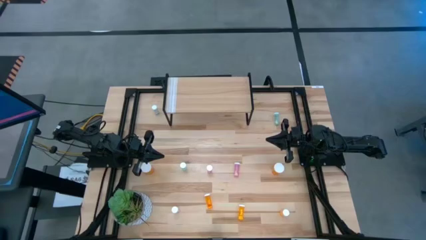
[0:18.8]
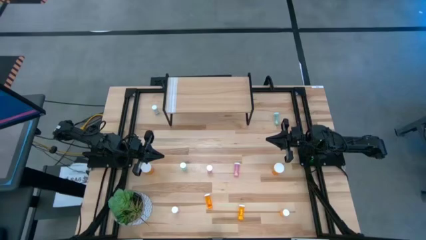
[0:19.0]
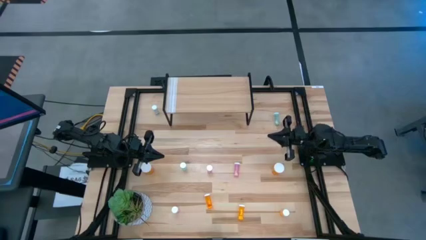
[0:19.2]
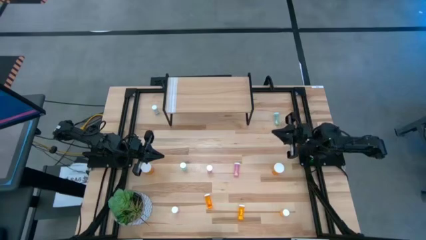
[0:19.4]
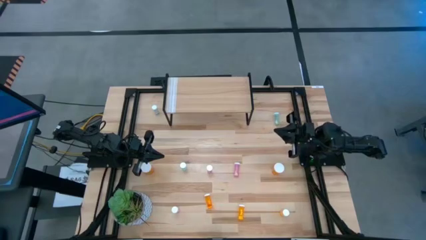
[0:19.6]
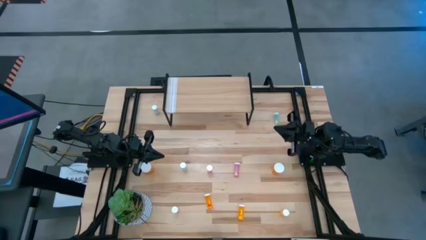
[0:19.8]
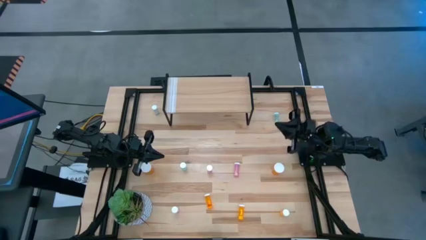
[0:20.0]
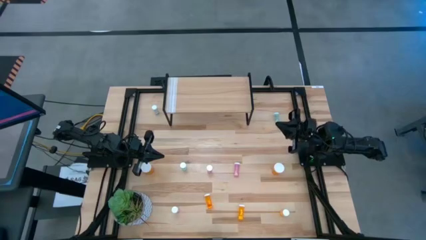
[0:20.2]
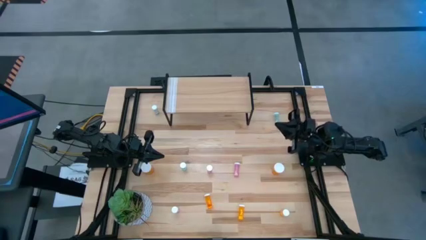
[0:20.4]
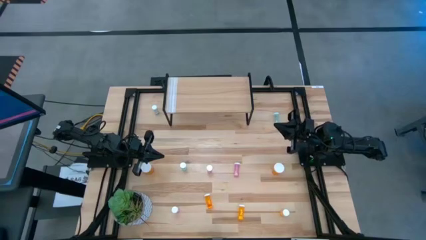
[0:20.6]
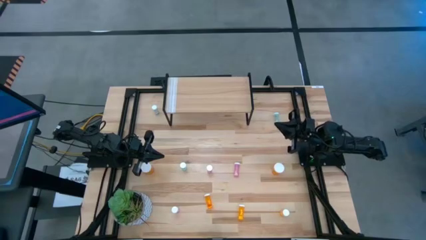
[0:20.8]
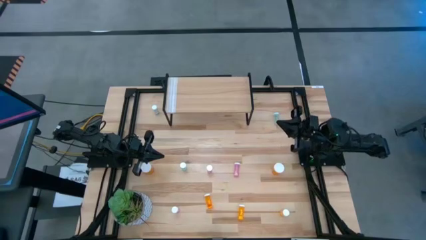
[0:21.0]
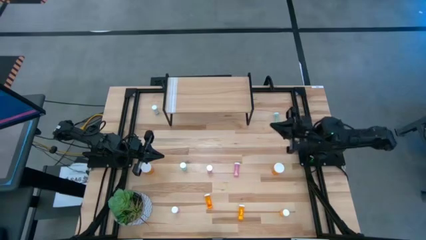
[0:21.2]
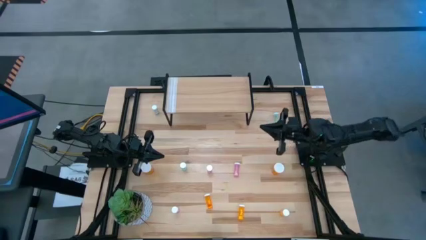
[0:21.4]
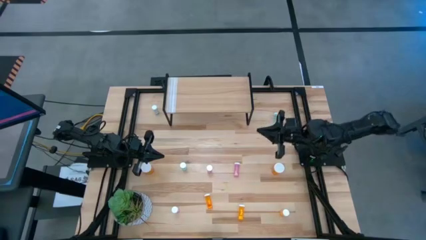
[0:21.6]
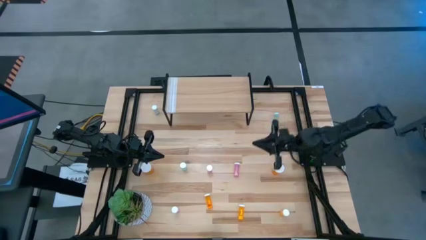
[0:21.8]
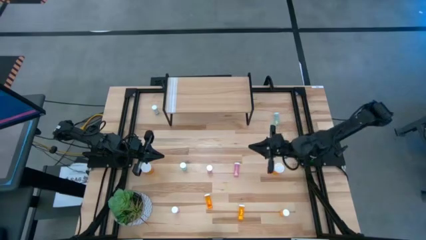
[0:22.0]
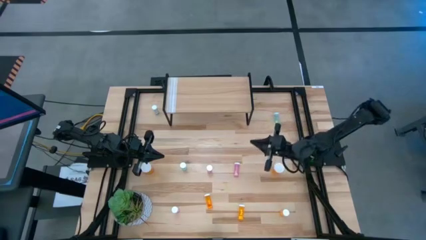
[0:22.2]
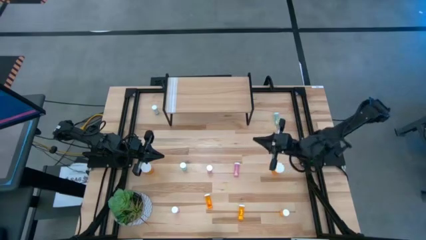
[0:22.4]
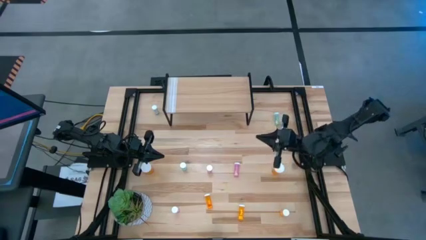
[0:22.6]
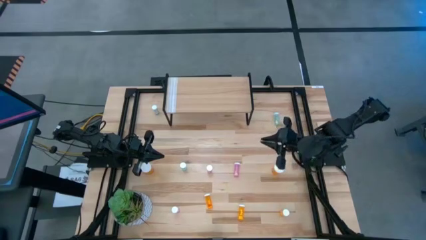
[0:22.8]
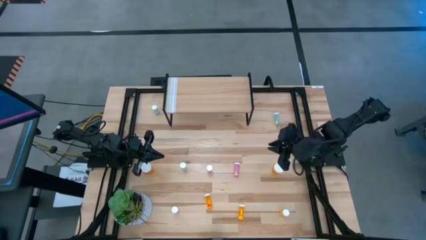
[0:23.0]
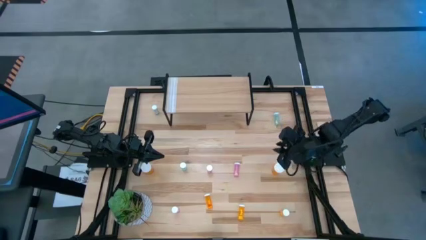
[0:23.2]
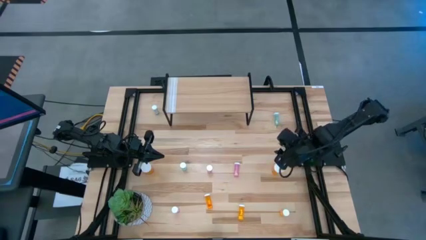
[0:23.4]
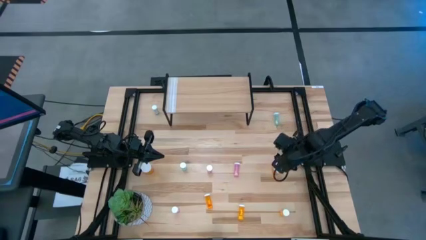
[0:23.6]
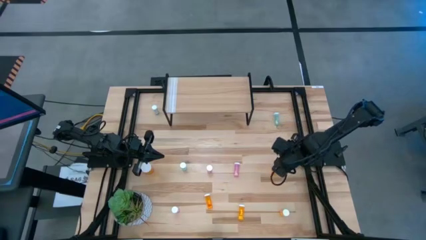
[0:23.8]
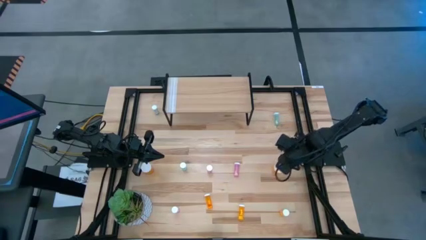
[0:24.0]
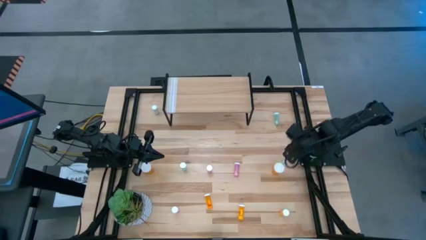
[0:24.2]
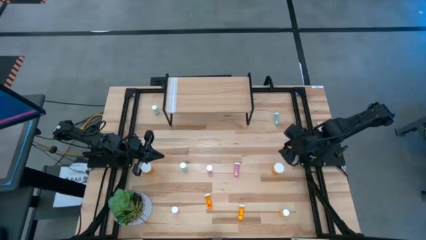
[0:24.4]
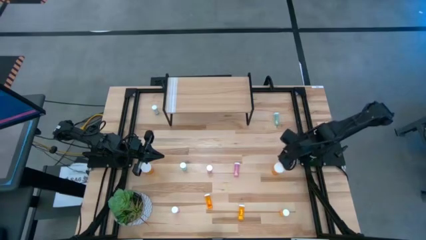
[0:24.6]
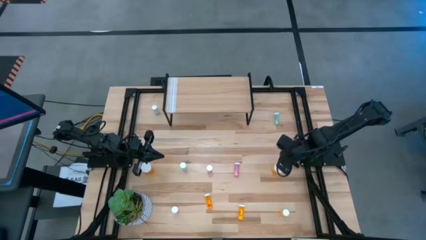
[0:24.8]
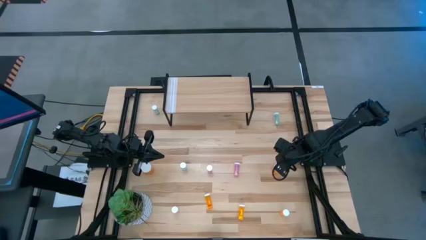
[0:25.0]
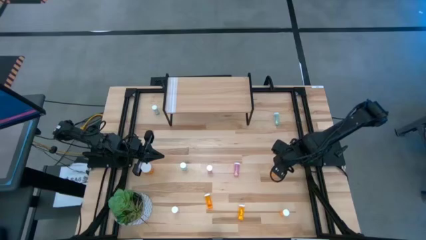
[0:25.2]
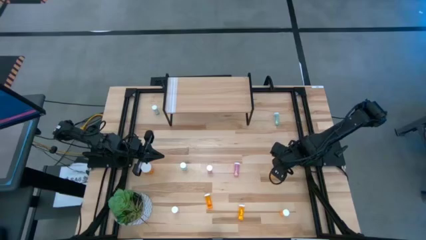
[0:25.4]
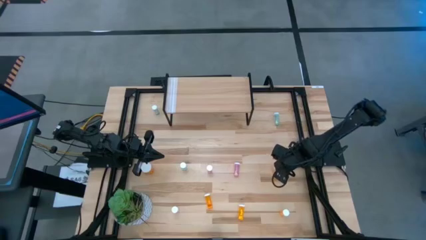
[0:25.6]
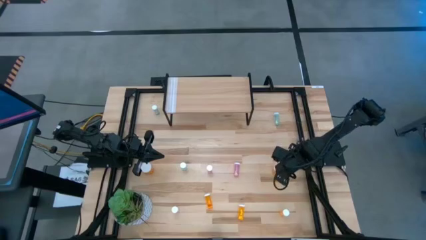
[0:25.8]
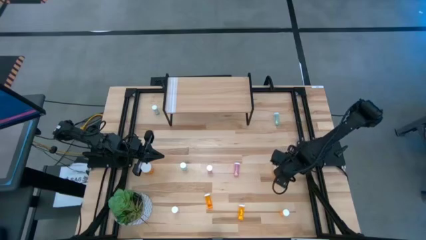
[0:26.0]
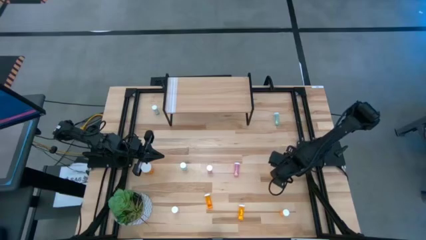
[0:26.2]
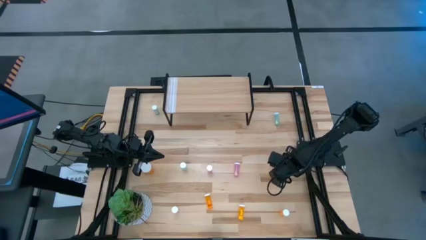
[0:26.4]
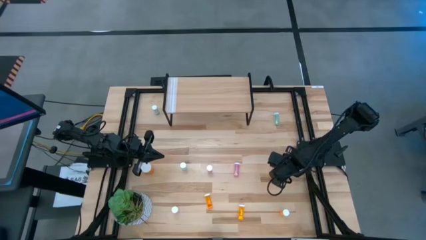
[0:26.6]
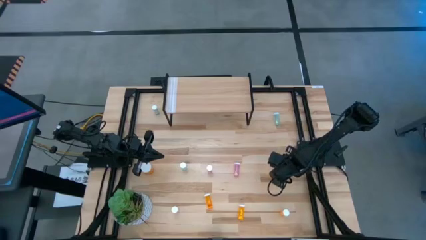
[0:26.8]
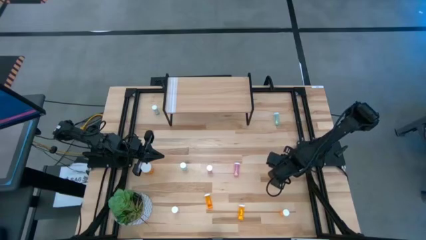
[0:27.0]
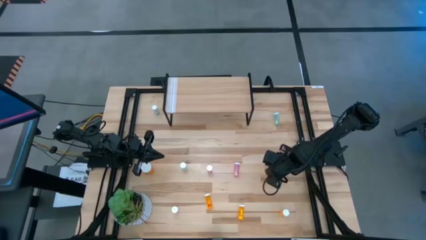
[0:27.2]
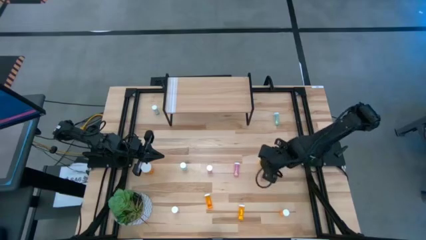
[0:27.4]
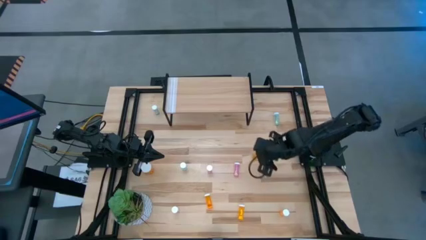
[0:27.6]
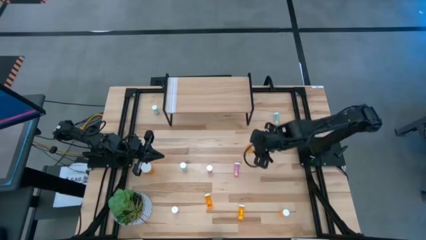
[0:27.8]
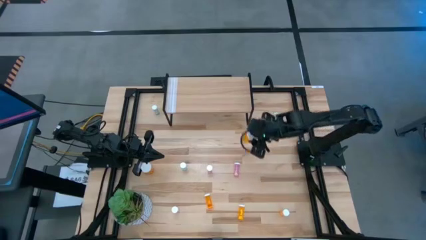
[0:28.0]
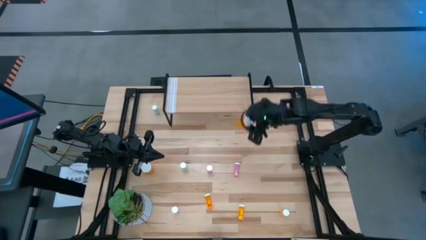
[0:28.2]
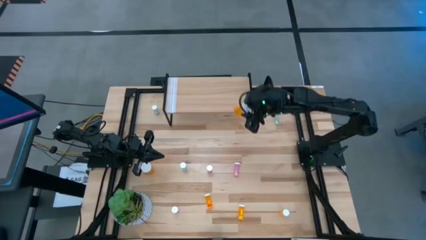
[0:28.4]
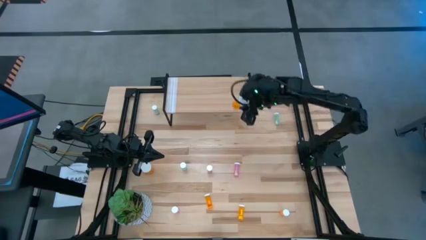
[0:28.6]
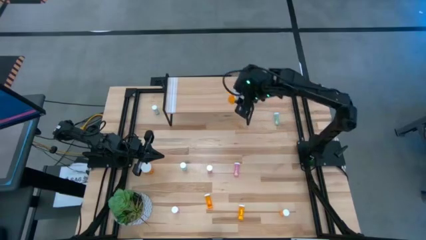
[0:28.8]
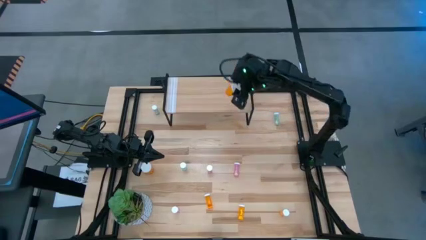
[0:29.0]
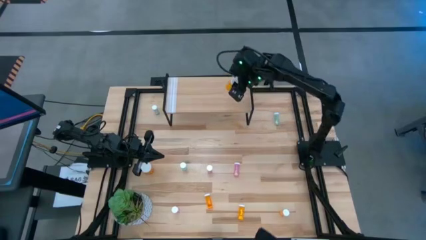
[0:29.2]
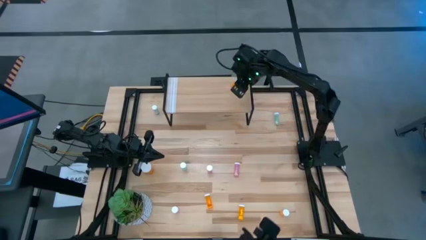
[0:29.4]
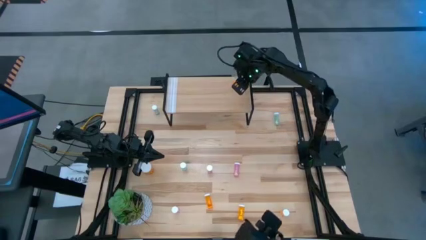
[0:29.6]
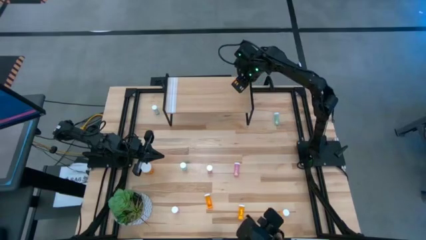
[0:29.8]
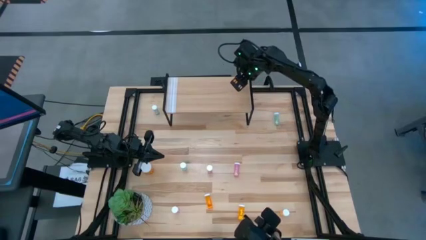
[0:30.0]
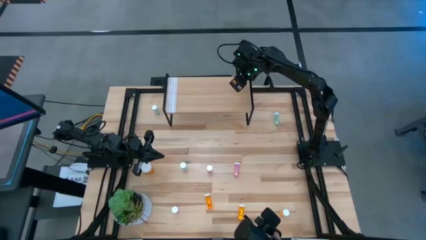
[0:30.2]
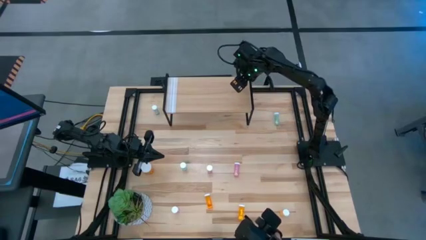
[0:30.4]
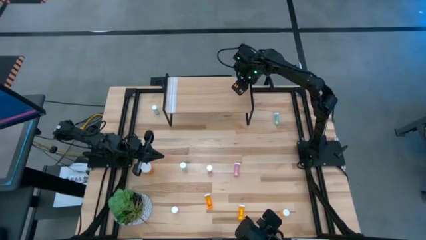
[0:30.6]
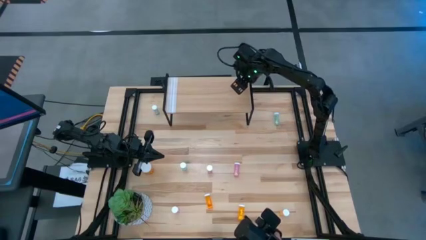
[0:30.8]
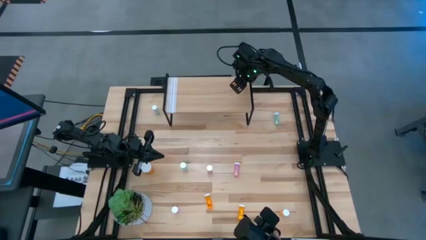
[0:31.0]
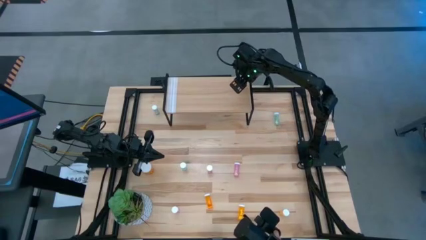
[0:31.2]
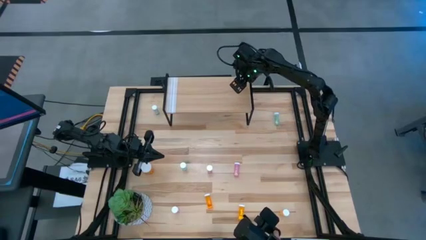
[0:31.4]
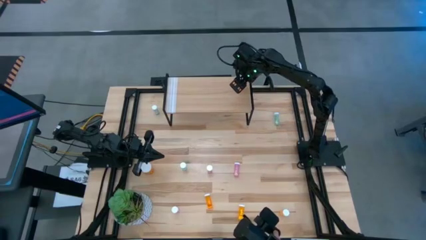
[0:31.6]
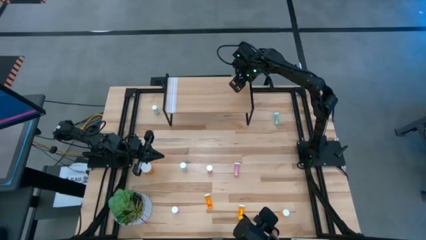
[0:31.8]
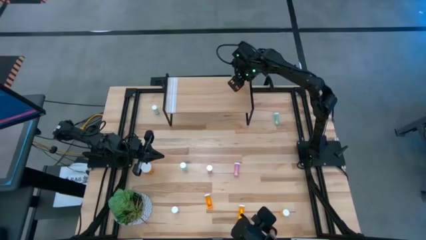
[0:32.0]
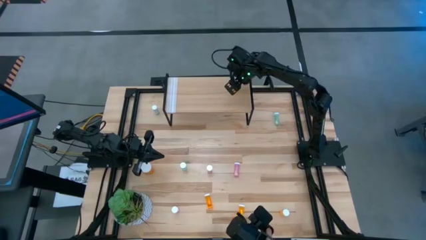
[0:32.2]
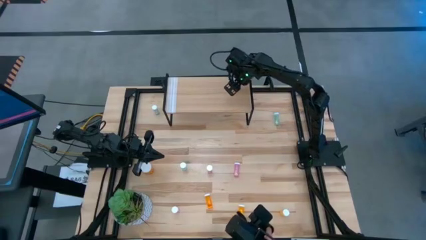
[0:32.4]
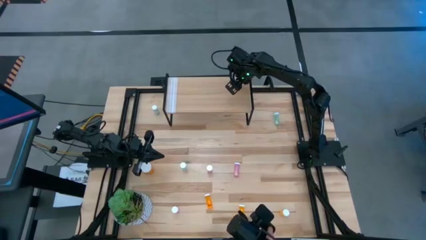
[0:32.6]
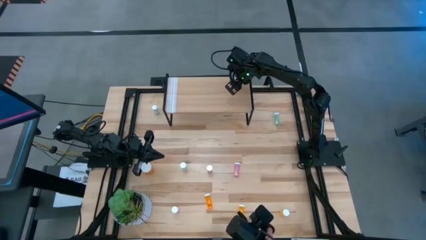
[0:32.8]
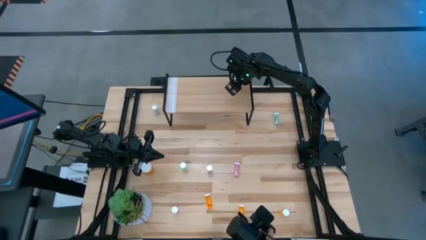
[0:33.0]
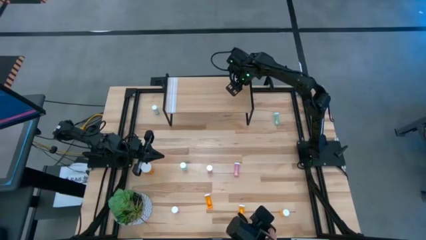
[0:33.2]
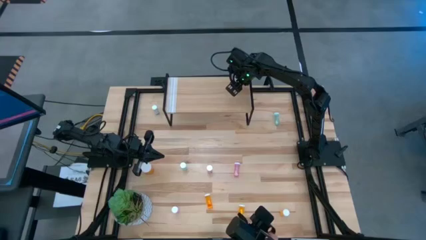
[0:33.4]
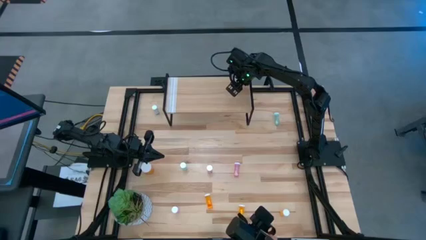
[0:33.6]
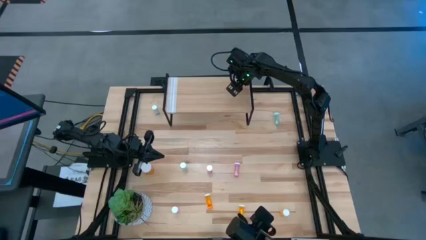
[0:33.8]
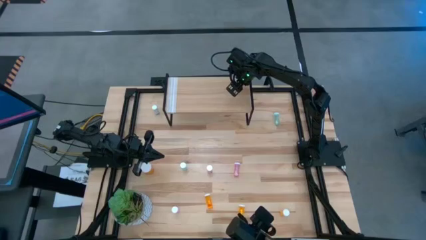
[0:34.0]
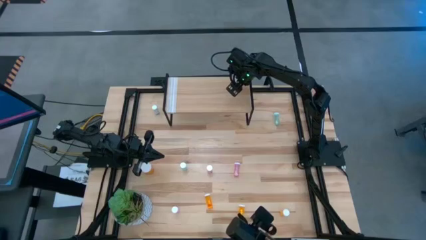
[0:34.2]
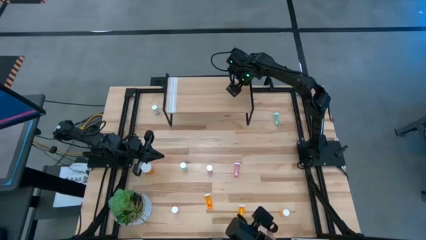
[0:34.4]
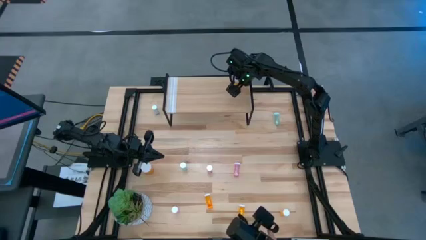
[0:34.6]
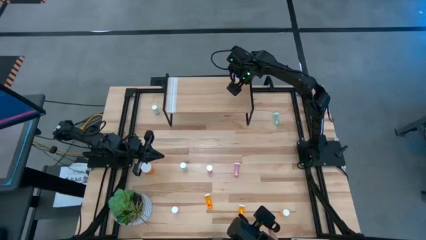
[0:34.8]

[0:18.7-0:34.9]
Task: Pick and place medicine bottles onto shelf by color
Put the right large orange pill bottle on the shelf
